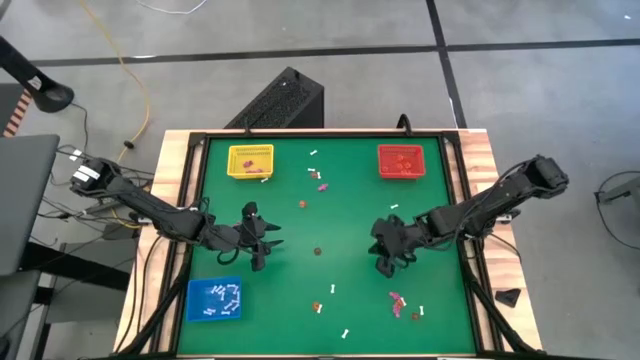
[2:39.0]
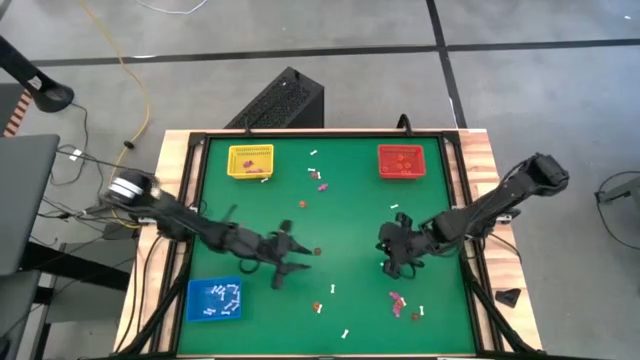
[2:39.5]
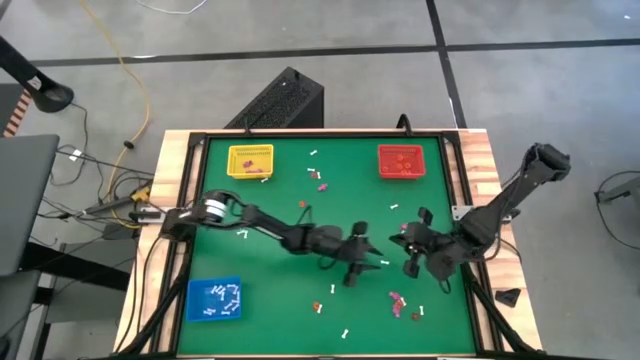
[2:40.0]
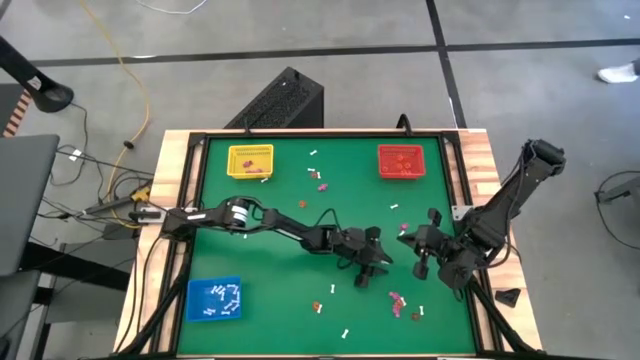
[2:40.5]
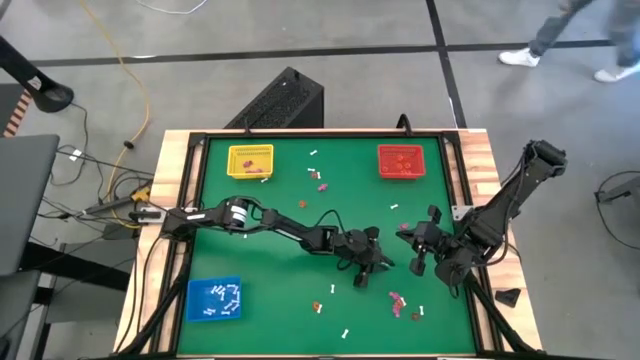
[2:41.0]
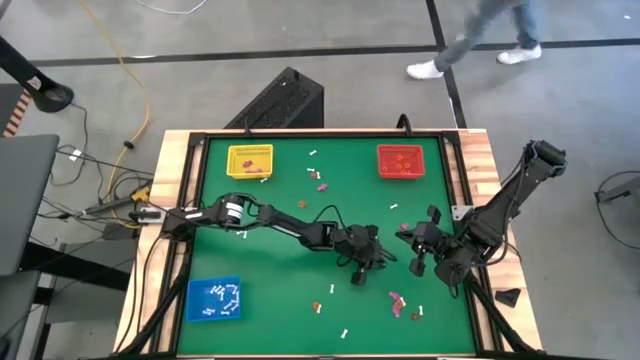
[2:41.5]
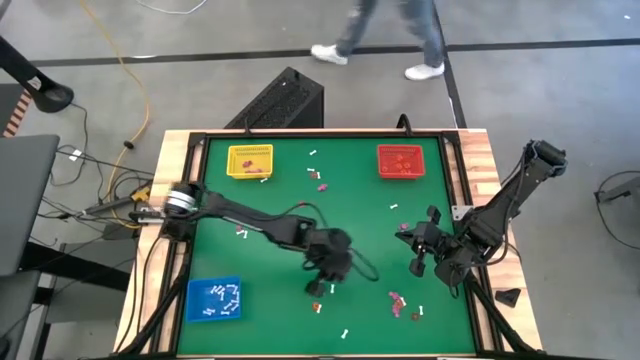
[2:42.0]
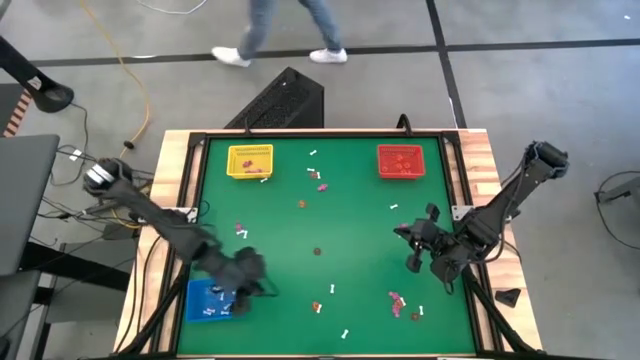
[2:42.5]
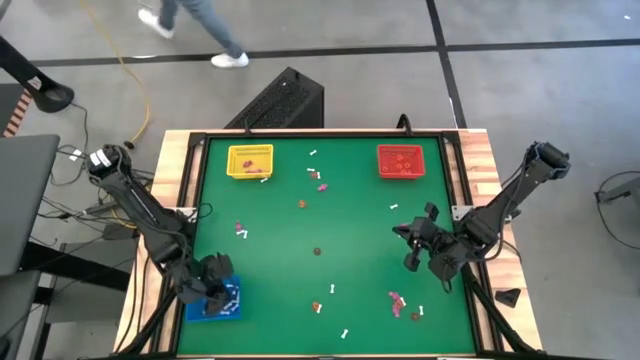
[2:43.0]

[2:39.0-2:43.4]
Task: Sort Halloween decoration
Put the white bone toy into the blue bin

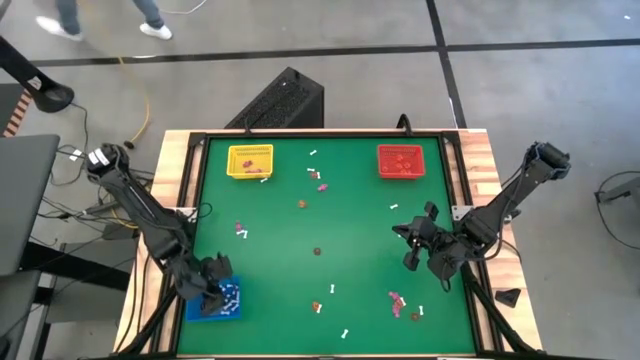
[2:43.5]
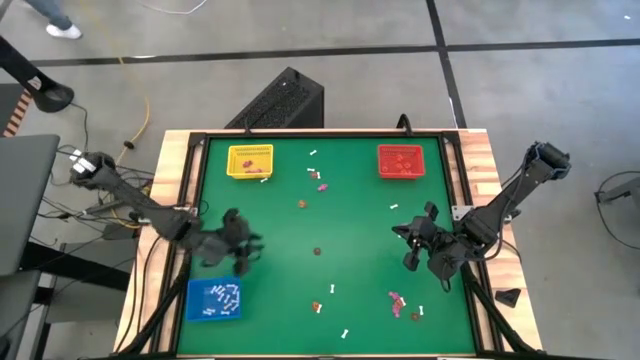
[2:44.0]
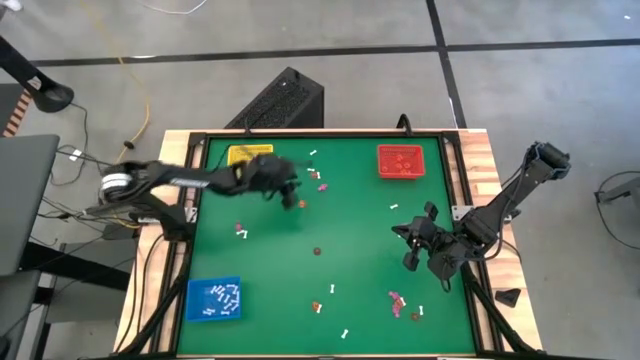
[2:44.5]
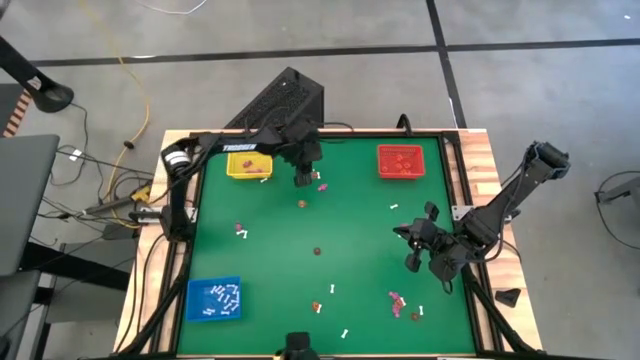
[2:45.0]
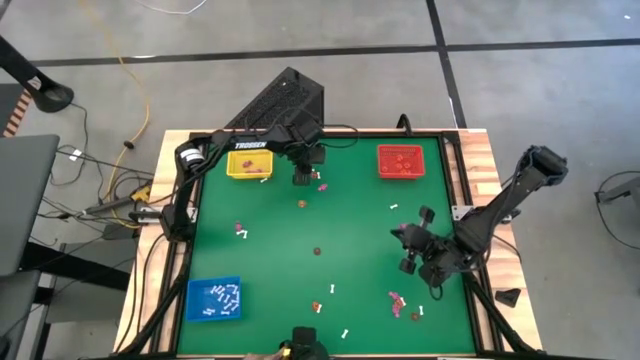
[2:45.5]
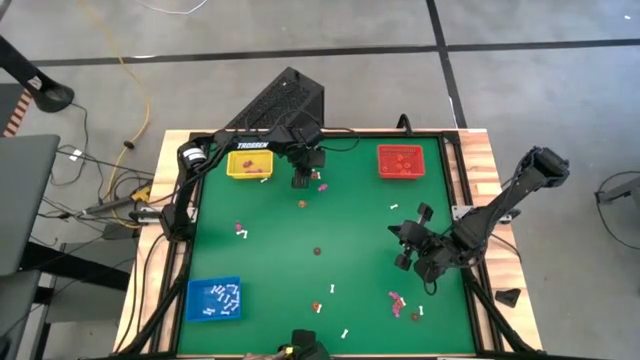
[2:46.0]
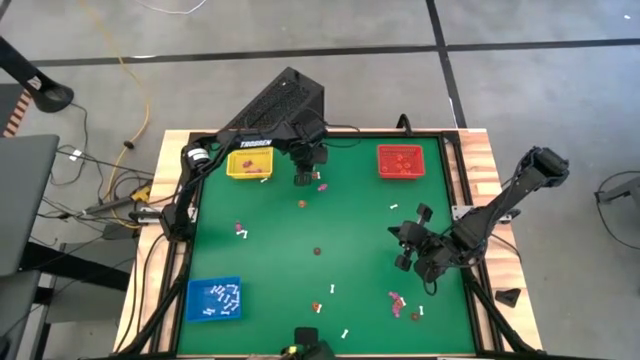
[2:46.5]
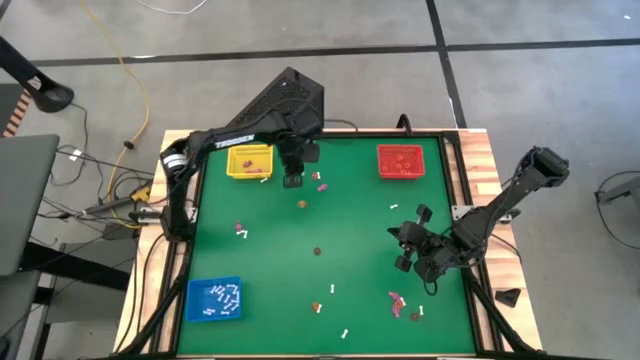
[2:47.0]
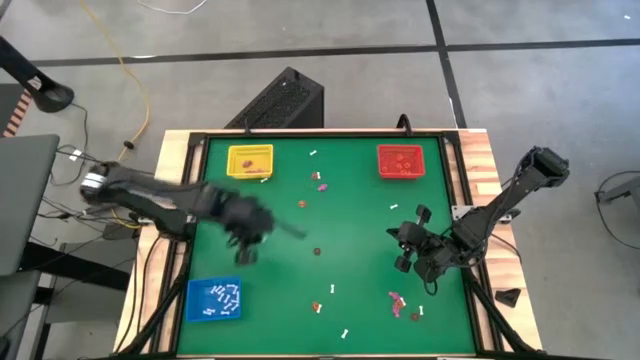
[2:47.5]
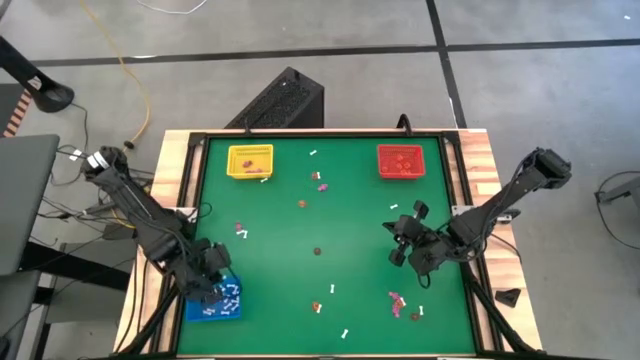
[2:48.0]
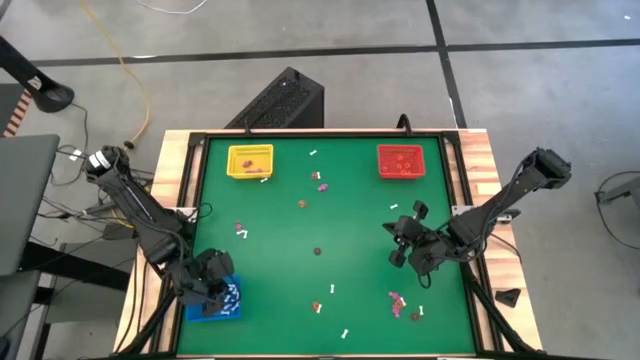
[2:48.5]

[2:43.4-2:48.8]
Put the white bone toy into the blue bin

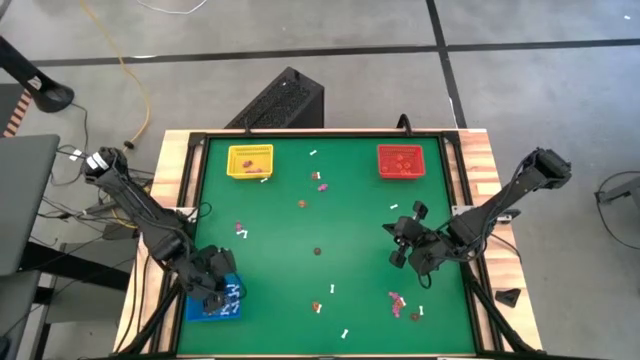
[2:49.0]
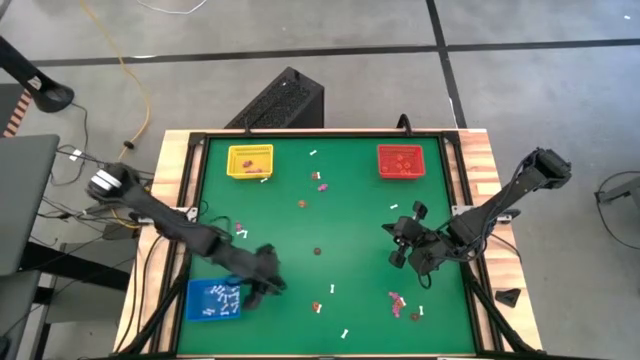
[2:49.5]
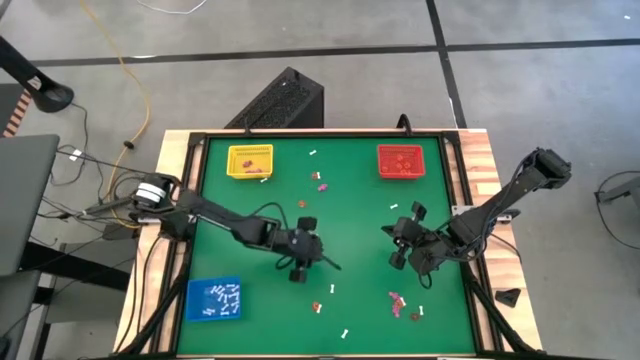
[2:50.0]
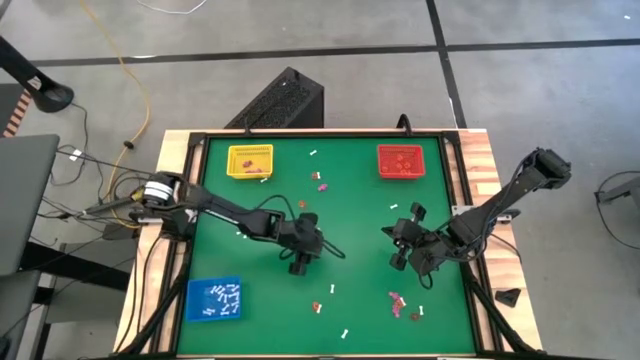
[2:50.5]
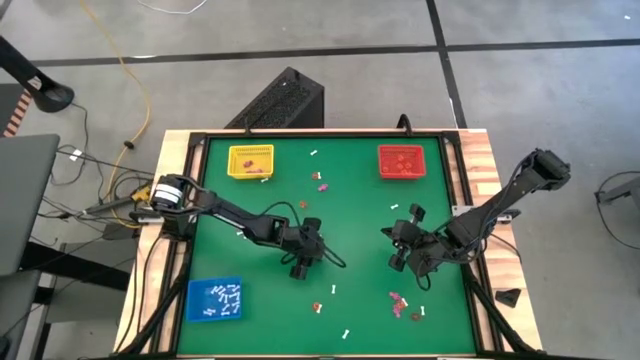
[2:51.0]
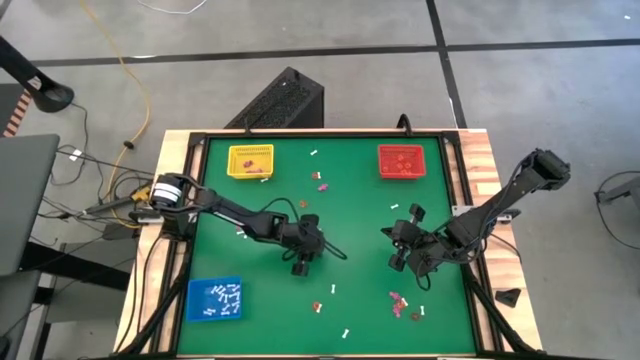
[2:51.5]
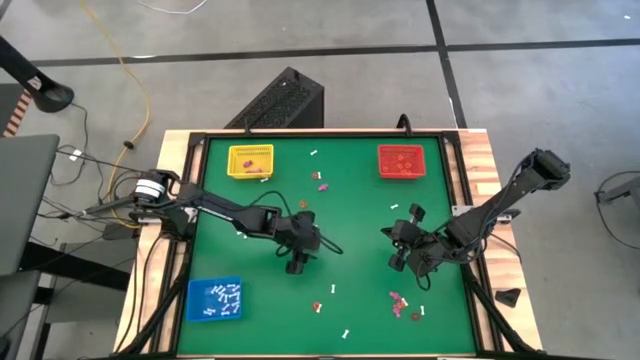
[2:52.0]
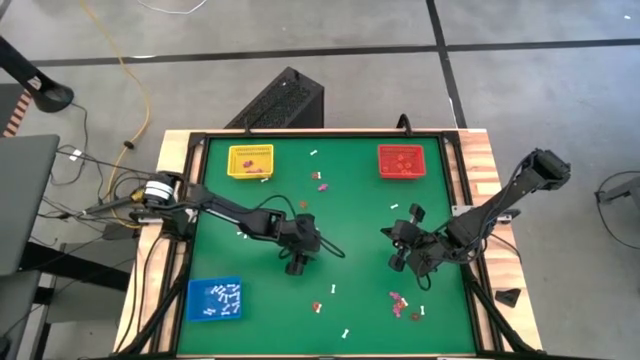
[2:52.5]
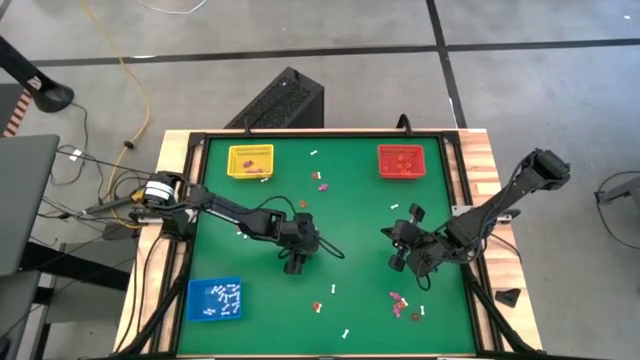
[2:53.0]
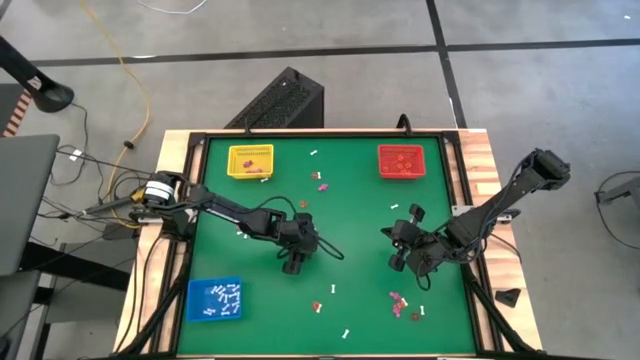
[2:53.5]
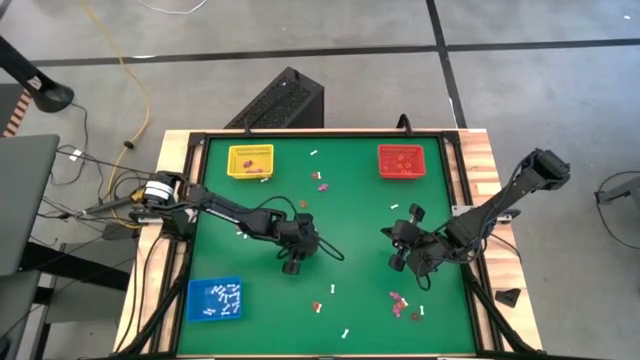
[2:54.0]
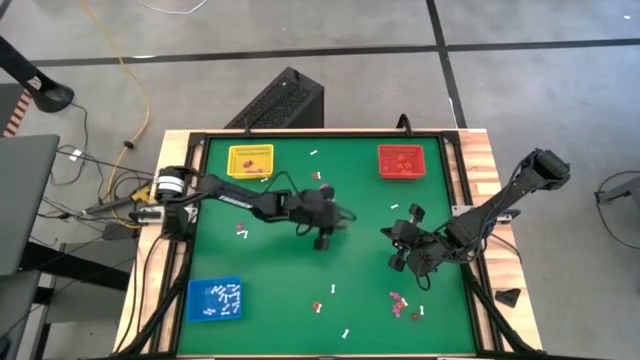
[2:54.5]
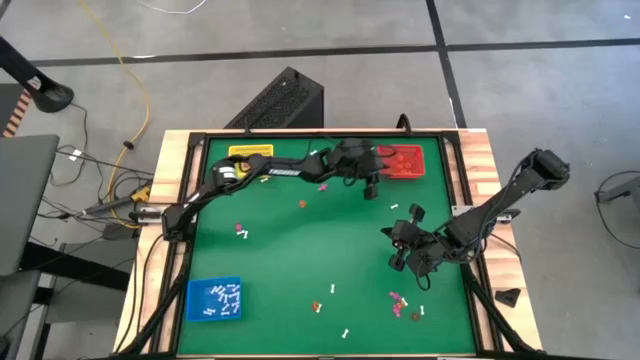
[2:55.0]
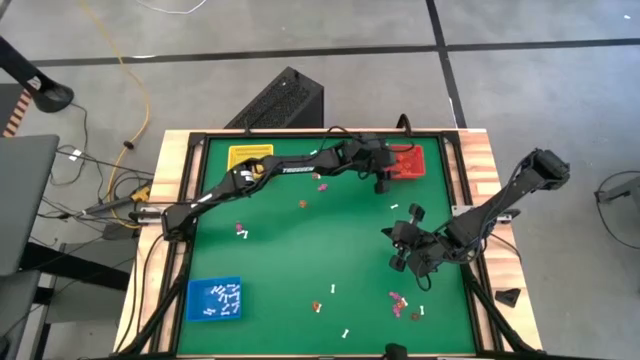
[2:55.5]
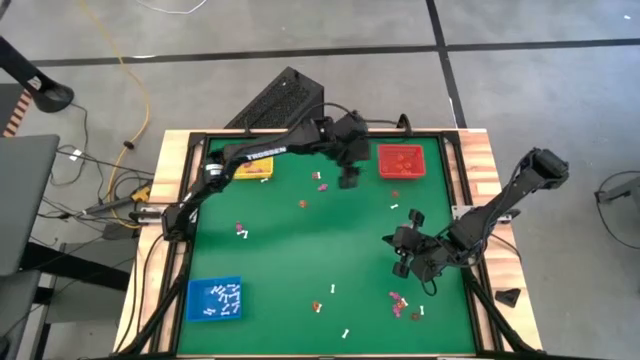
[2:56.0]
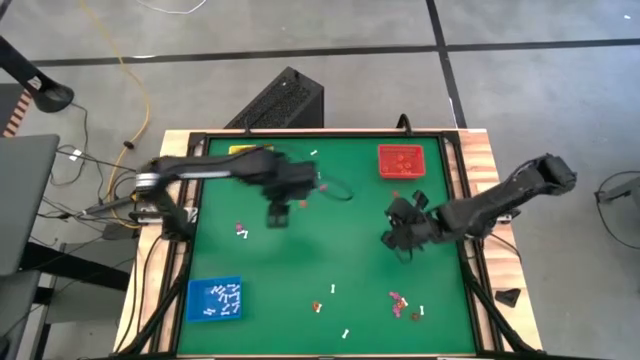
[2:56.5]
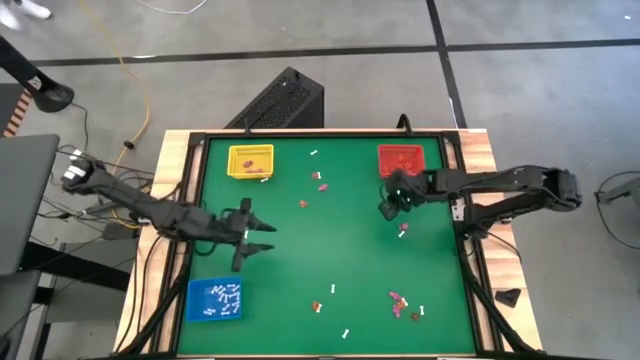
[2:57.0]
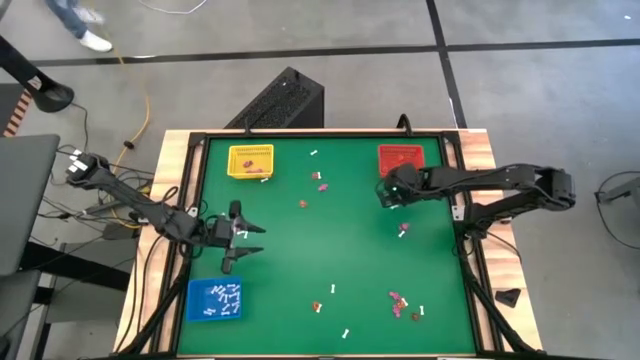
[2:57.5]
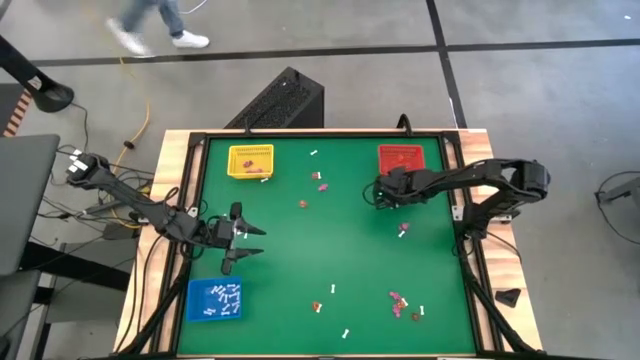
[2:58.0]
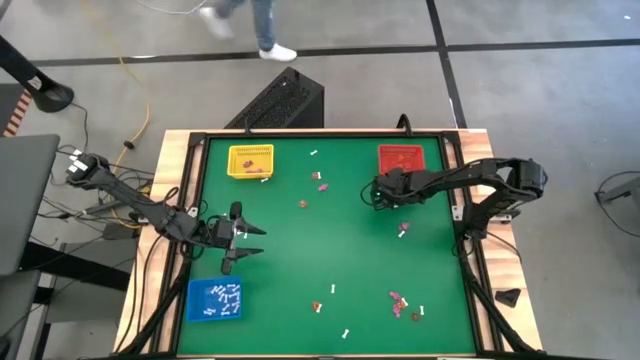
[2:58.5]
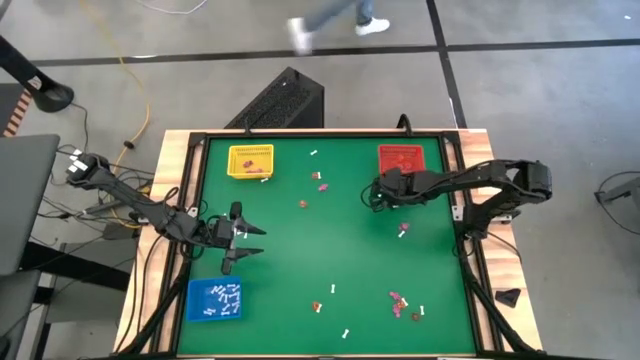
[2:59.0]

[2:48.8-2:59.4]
Put the orange clover toy into the orange bin

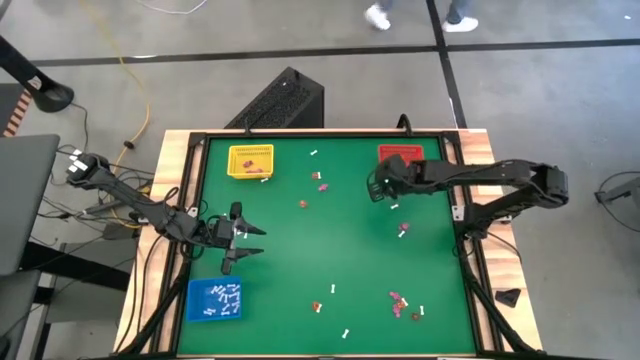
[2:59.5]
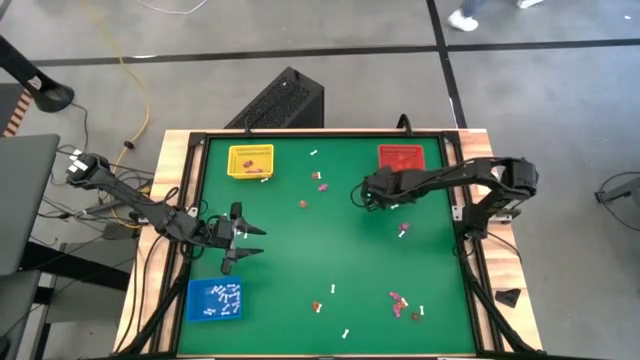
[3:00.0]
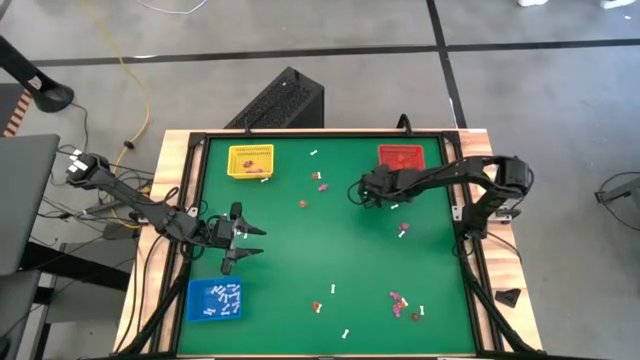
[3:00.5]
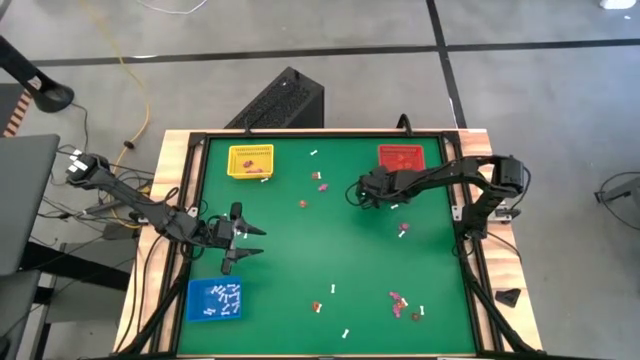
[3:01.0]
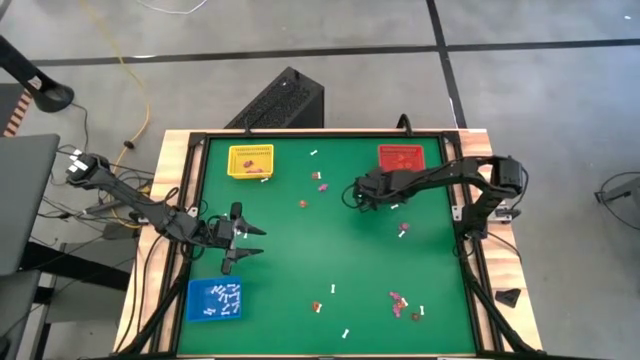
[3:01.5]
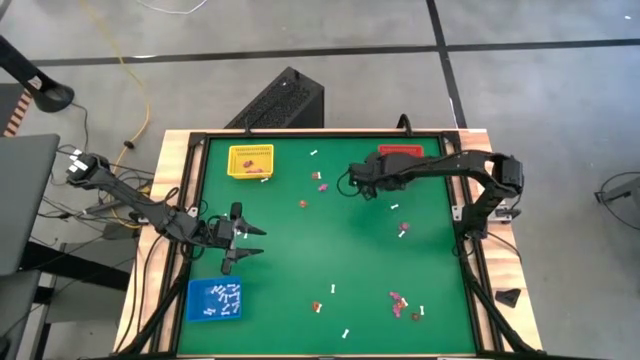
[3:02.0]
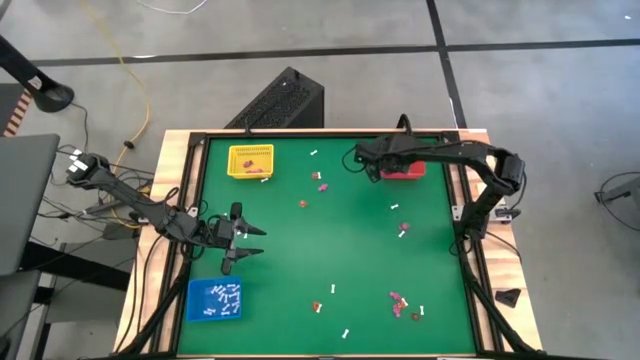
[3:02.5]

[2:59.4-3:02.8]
Put the pumpkin toy into the orange bin
